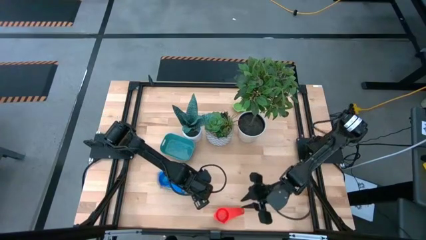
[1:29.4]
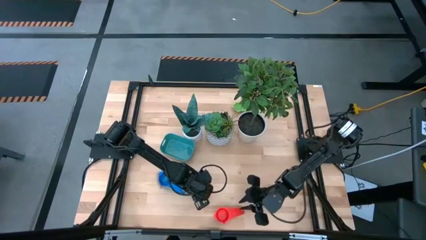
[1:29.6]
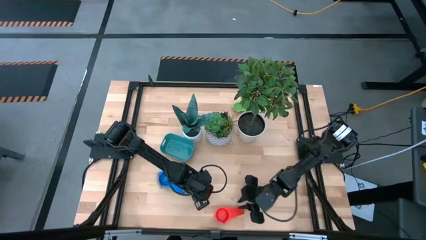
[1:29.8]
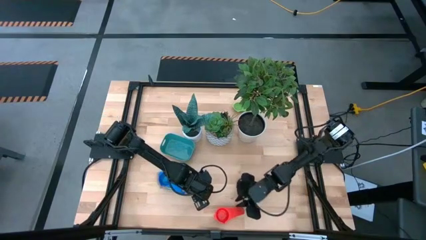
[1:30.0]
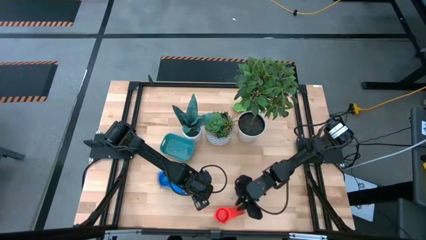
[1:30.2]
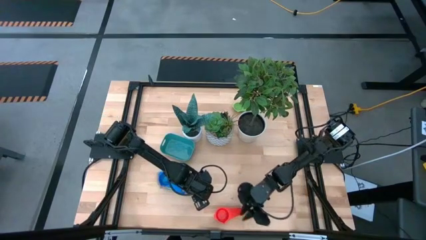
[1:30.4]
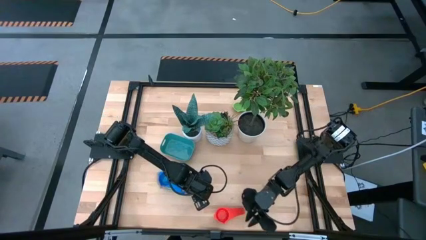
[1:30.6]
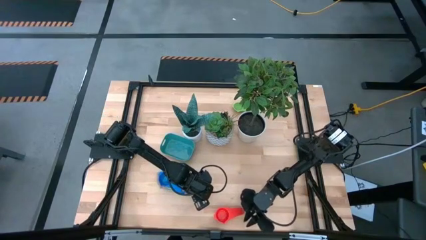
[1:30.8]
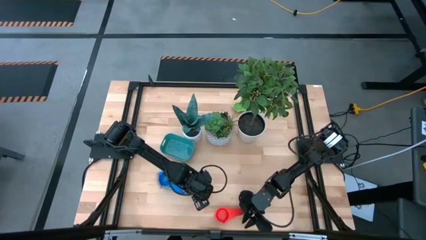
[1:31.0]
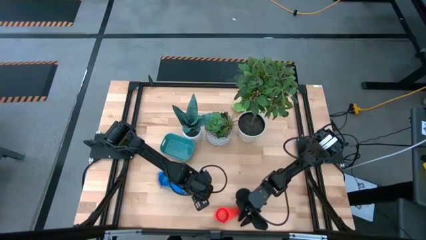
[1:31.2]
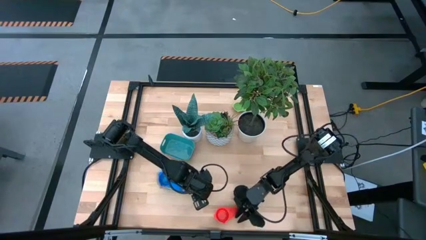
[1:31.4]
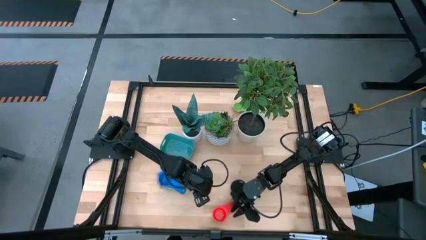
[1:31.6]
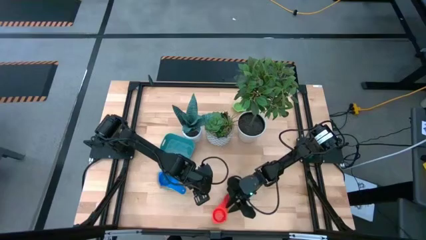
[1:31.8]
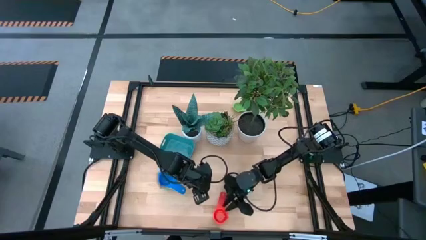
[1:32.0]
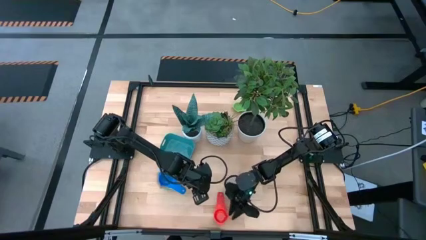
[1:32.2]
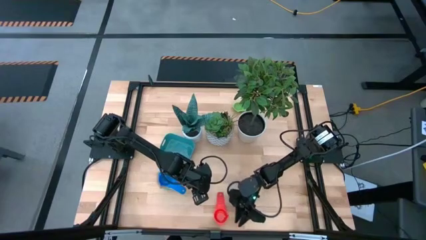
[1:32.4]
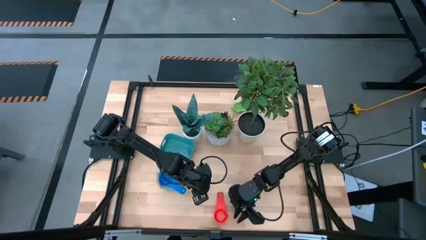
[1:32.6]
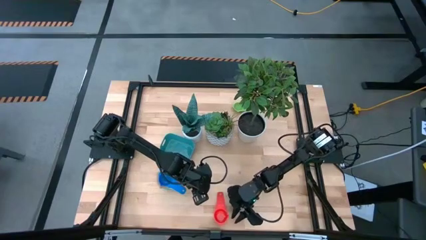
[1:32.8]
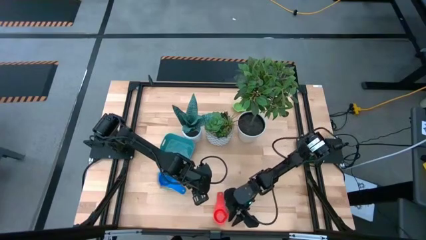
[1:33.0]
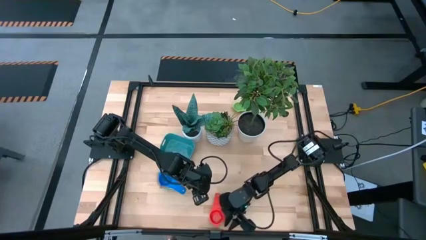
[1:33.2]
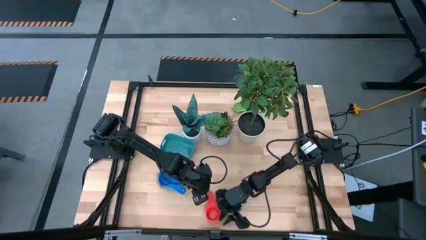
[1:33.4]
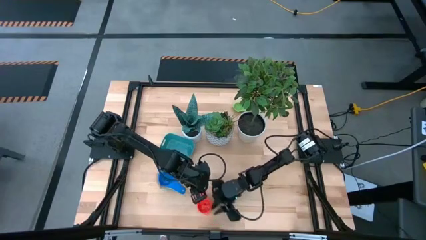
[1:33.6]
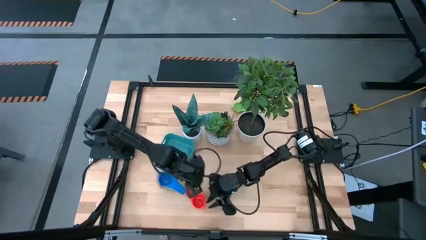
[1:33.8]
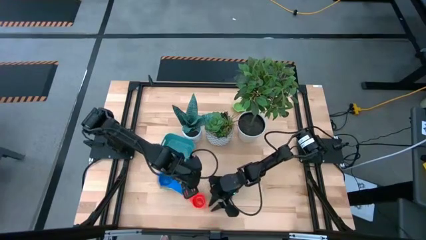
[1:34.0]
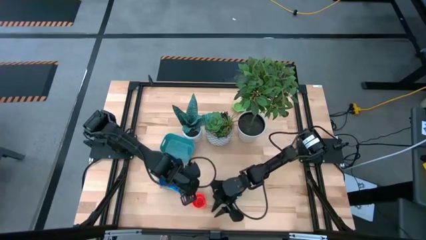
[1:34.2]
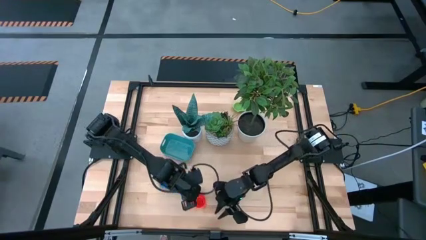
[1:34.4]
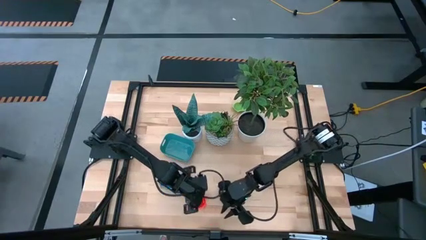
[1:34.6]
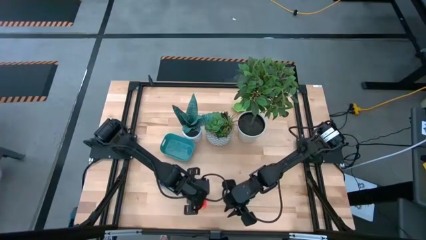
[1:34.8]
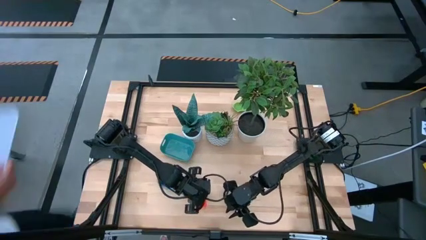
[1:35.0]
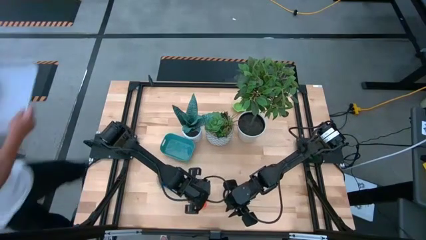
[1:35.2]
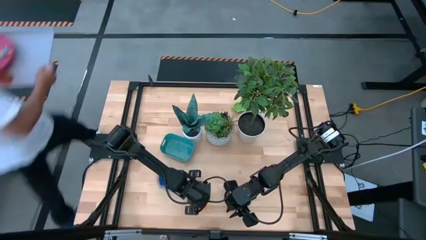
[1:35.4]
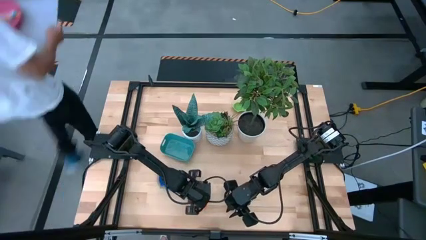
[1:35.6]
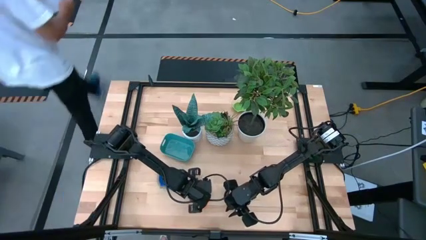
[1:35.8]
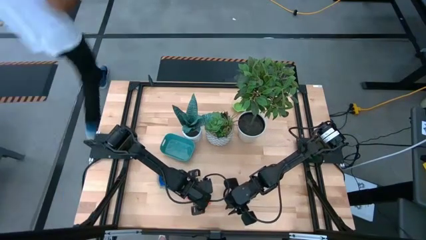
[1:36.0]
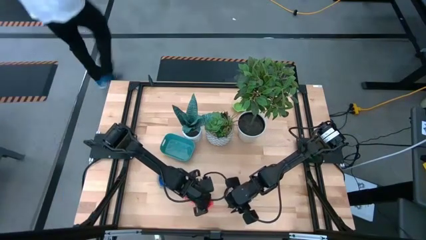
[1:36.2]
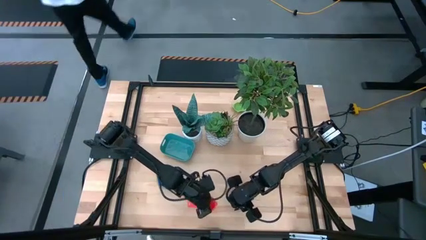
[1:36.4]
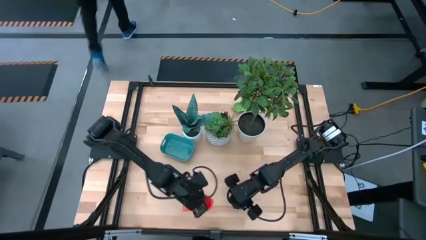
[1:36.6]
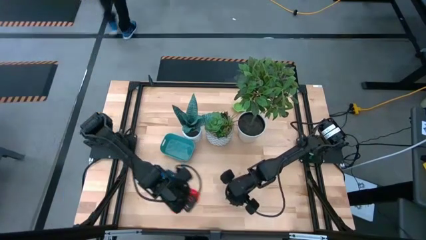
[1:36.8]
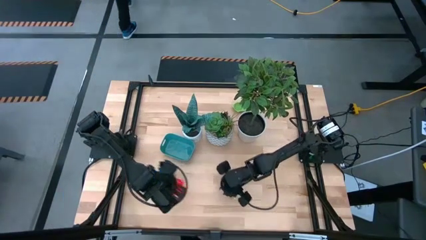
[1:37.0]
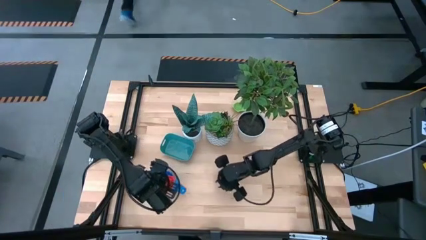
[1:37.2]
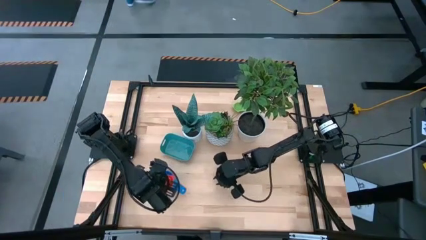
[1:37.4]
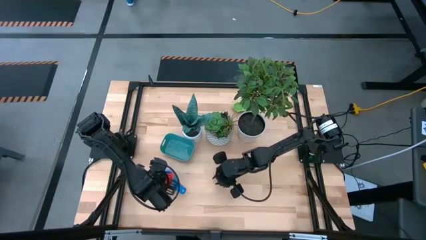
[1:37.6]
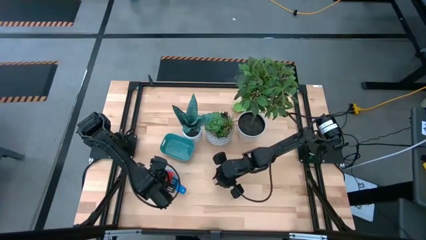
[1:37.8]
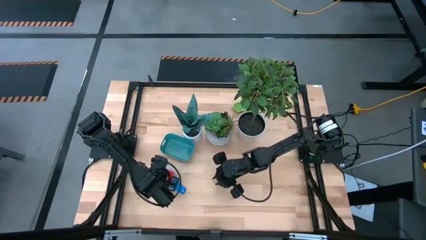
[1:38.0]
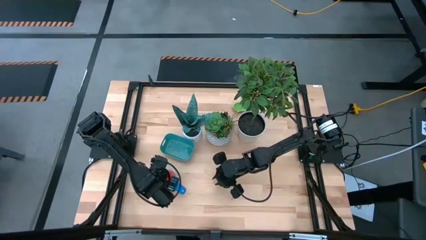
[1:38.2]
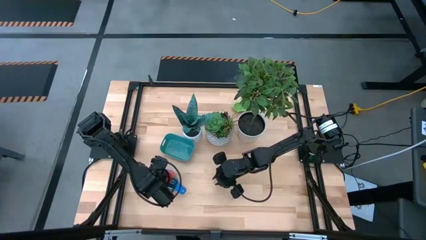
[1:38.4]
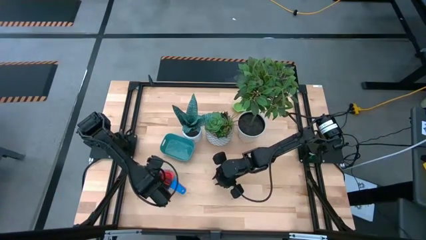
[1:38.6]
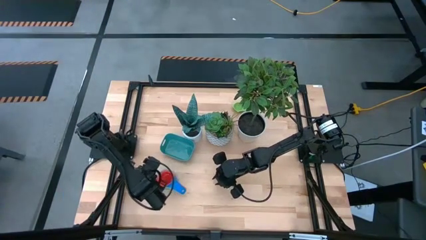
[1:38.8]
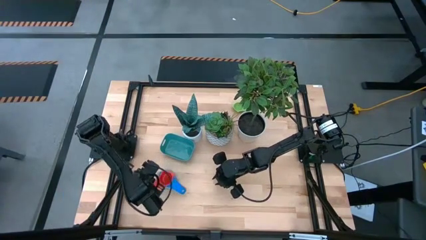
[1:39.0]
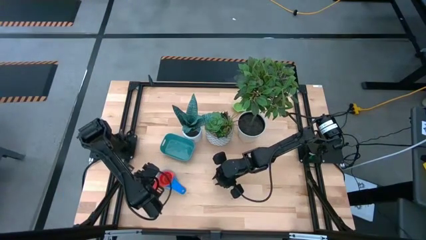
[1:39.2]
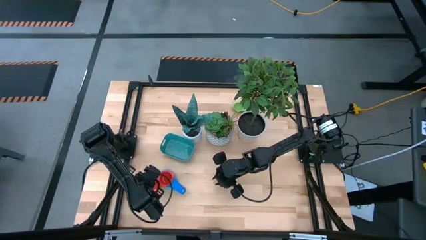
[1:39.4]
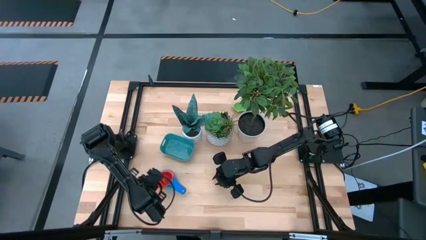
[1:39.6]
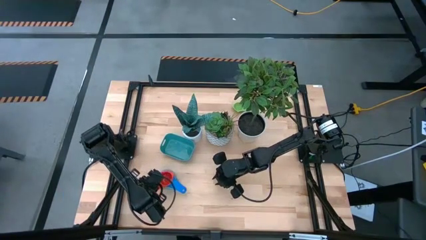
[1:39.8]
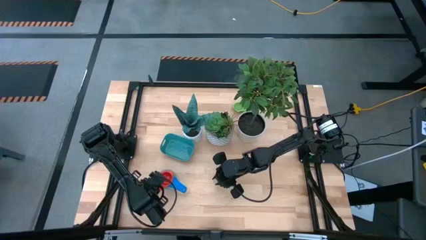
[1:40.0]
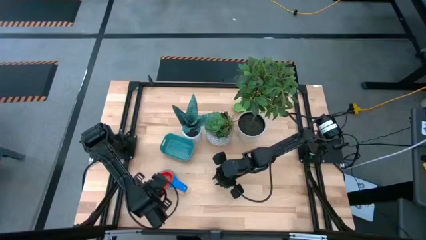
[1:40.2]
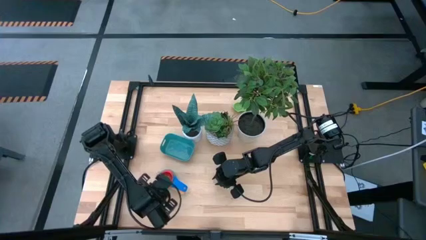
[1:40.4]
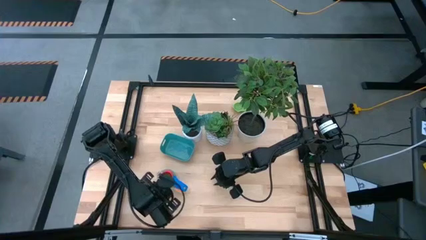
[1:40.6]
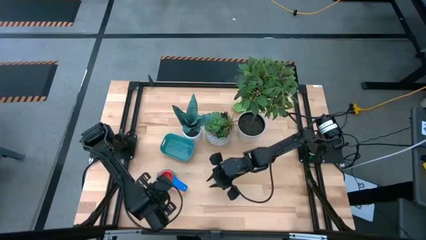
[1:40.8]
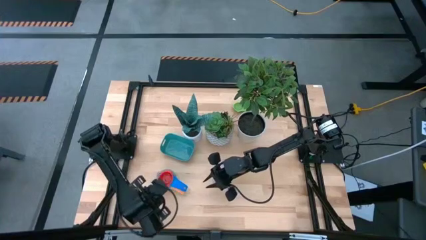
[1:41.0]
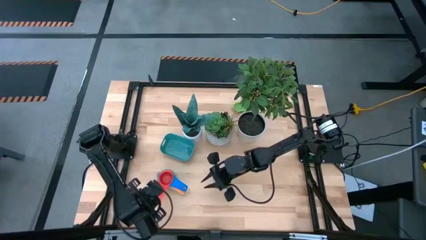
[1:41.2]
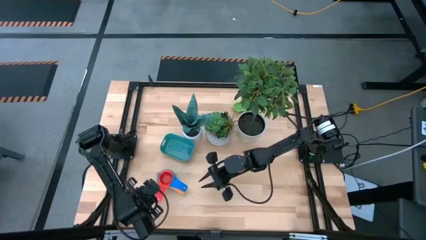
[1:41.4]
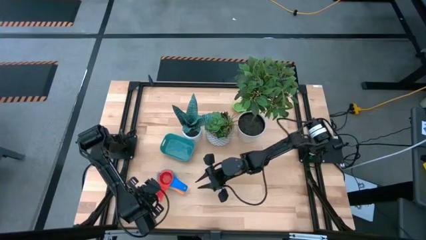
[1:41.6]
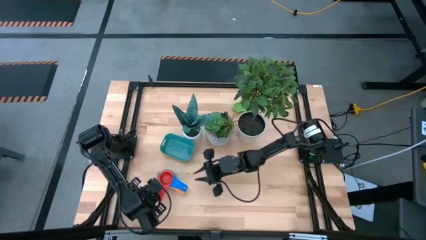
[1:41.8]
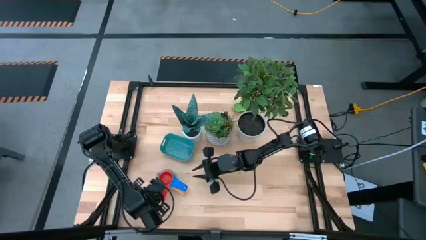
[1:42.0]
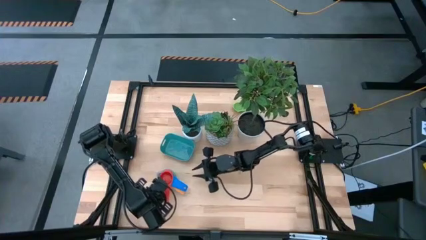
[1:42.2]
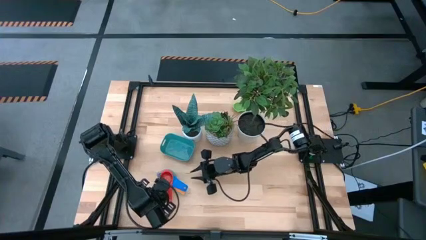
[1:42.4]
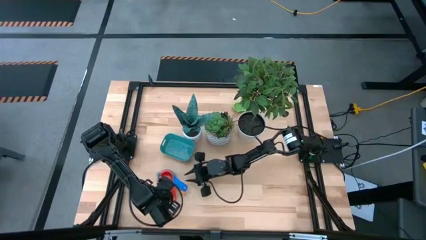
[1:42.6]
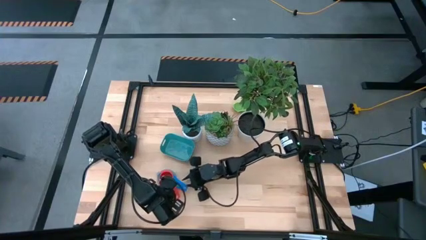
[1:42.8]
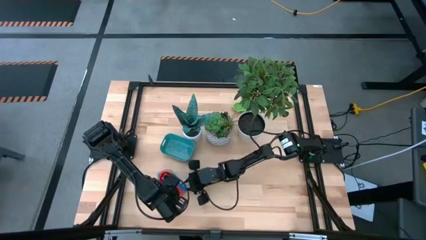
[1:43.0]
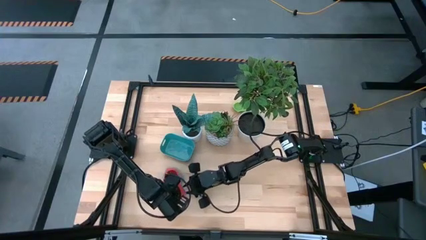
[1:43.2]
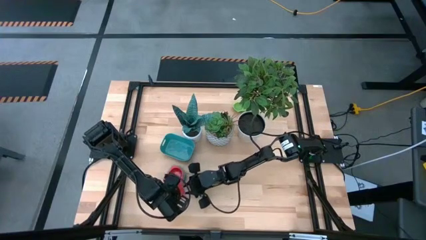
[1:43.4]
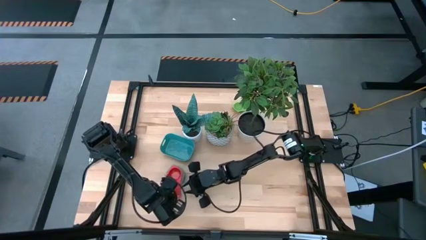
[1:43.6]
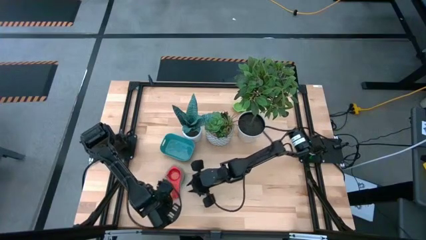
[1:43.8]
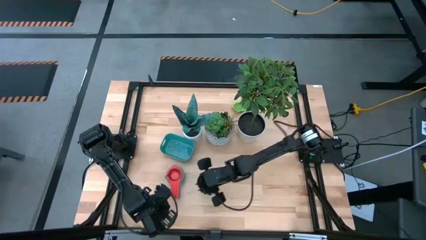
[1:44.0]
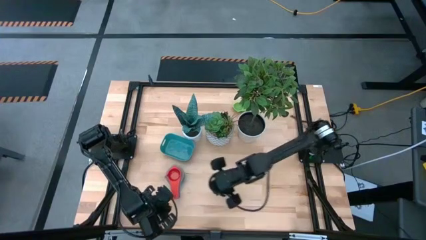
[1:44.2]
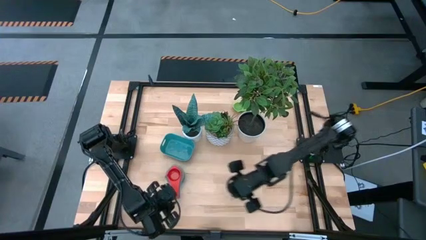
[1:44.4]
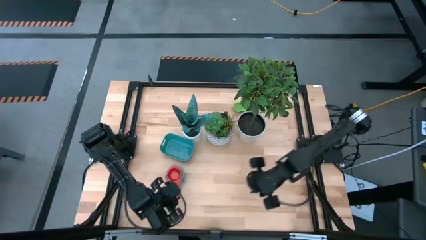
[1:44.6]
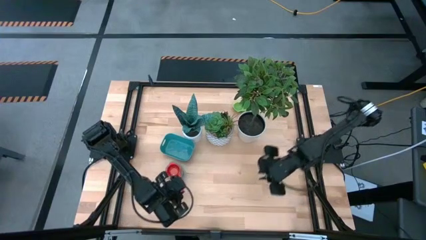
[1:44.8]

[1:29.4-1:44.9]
Task: Nest measuring cups in basket
Stack the red measuring cup into the blue measuring cup

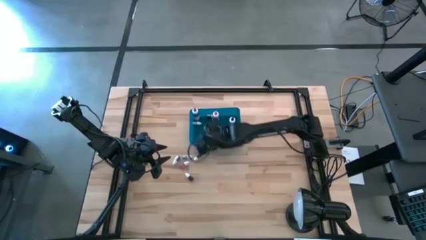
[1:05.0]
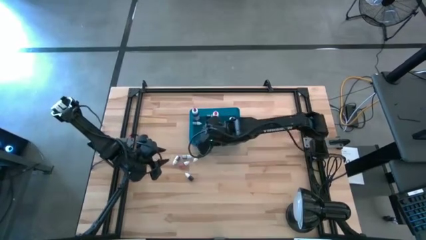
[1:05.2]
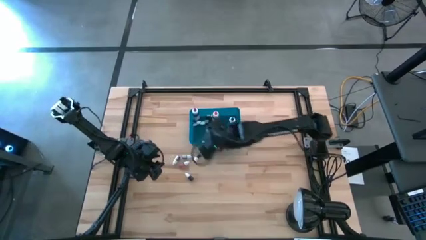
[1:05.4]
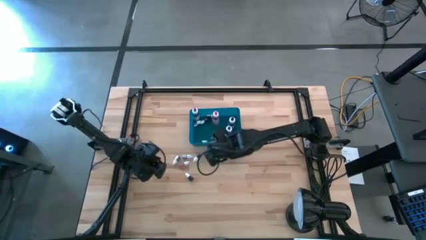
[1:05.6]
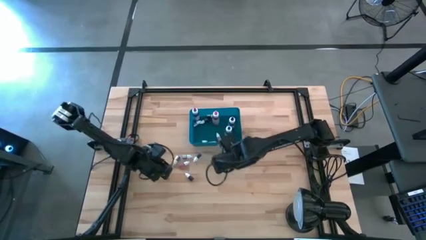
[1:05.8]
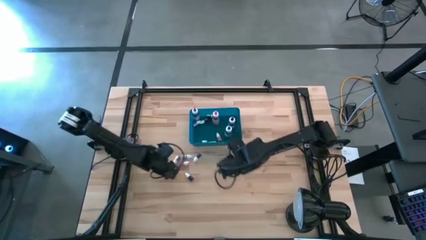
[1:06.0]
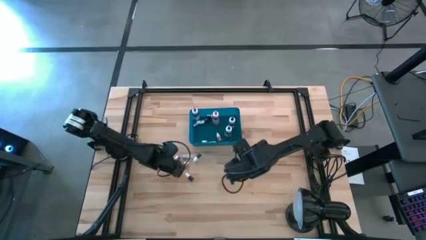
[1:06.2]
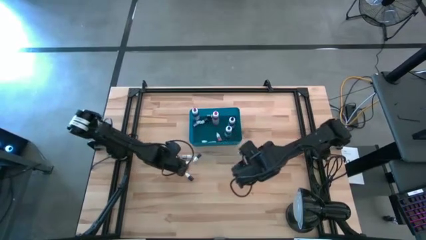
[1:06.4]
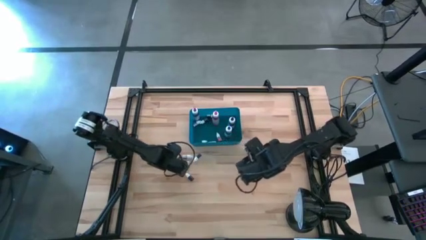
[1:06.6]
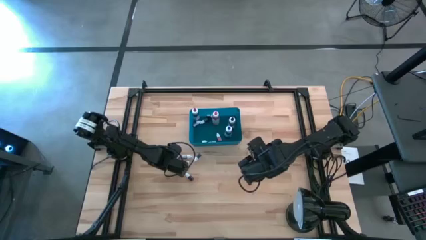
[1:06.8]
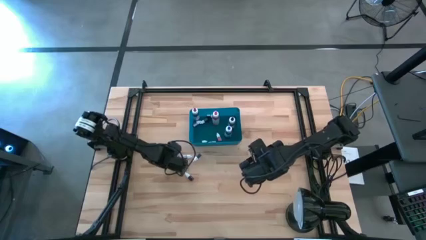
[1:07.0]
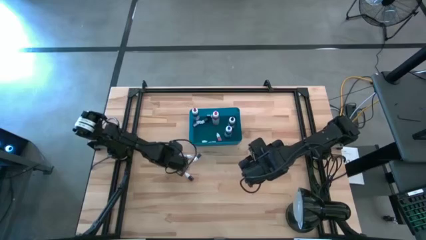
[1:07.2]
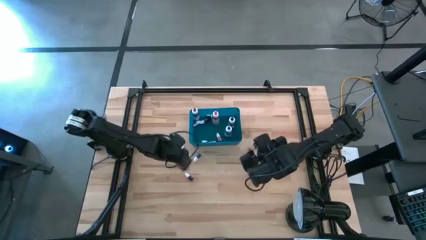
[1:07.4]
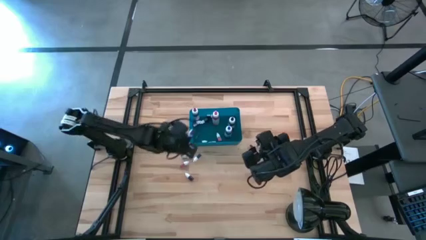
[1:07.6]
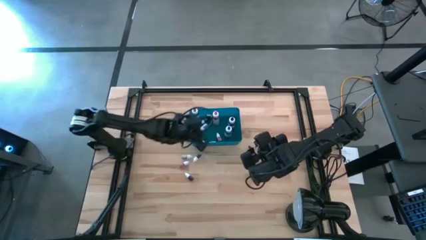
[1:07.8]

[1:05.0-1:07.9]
Task: Pick & Place food coloring
Put the small purple food coloring bottle into the bin
